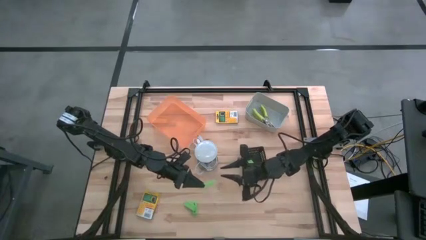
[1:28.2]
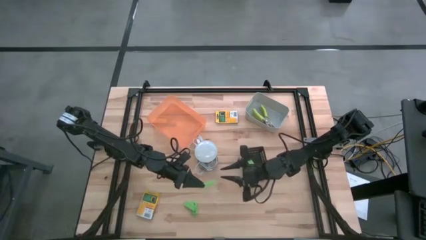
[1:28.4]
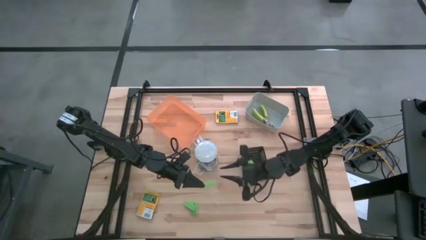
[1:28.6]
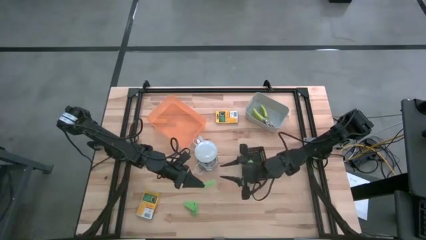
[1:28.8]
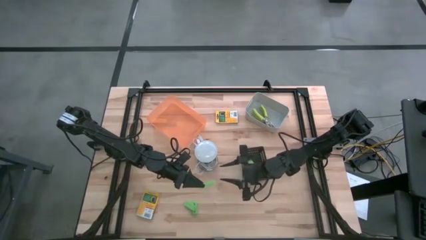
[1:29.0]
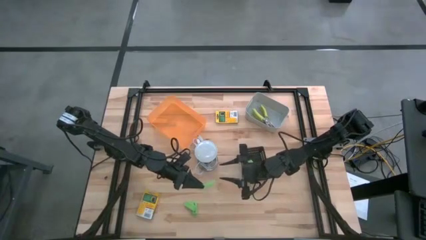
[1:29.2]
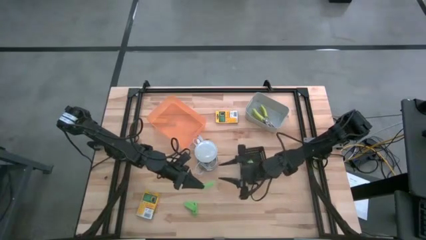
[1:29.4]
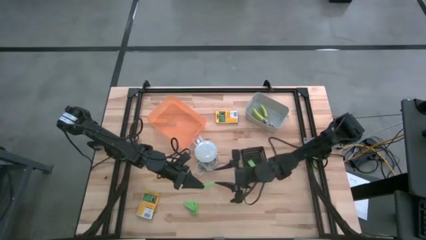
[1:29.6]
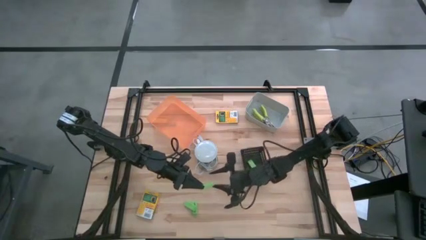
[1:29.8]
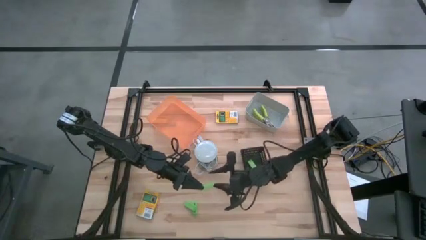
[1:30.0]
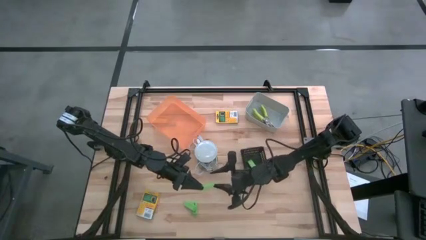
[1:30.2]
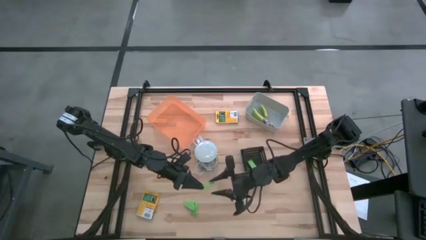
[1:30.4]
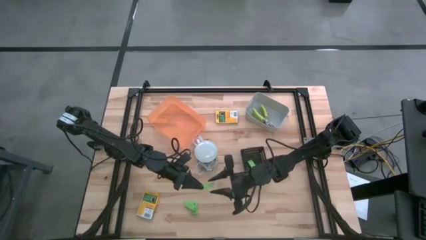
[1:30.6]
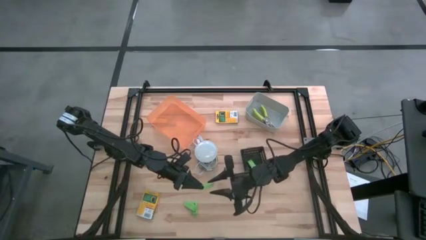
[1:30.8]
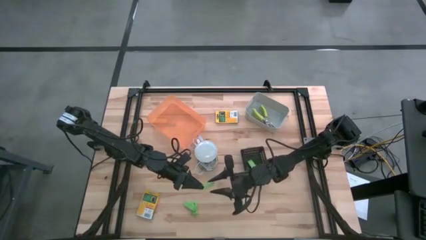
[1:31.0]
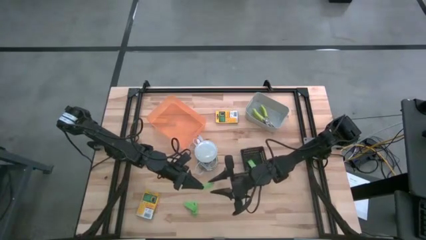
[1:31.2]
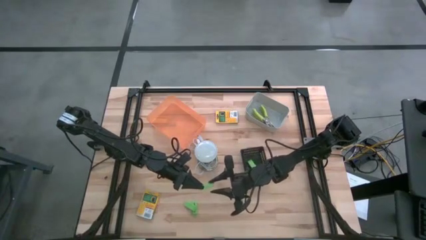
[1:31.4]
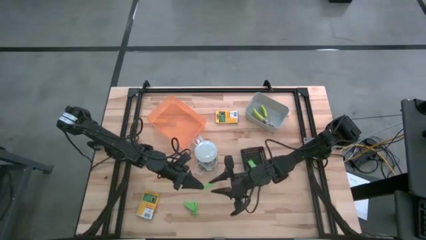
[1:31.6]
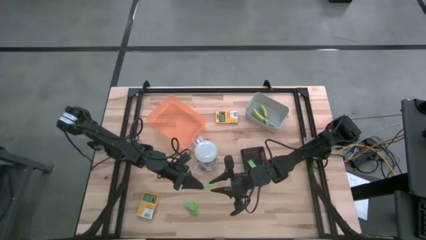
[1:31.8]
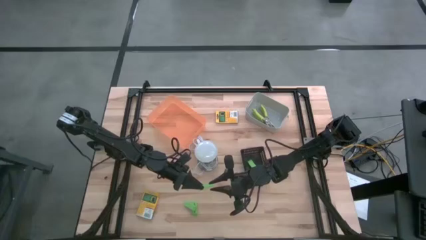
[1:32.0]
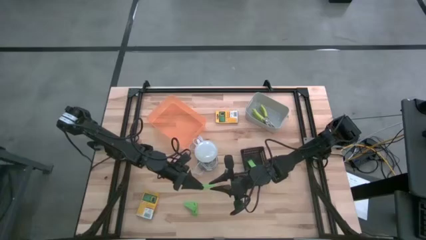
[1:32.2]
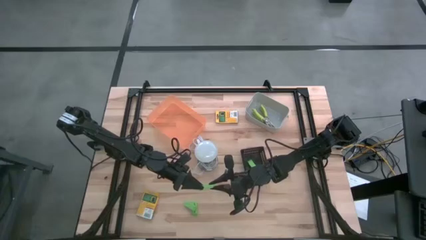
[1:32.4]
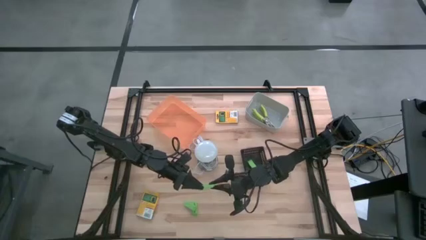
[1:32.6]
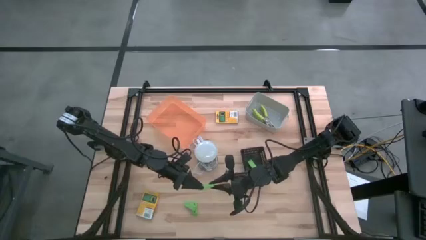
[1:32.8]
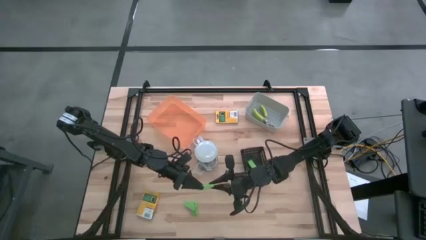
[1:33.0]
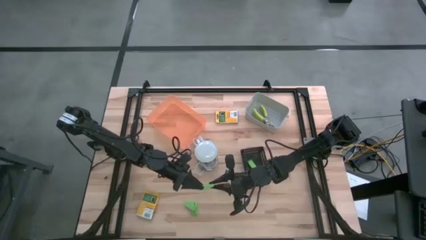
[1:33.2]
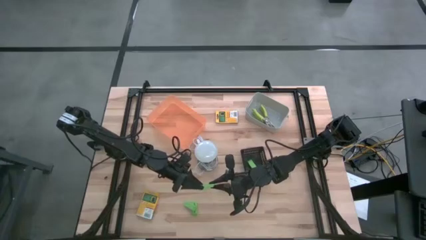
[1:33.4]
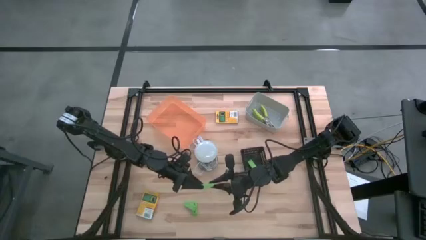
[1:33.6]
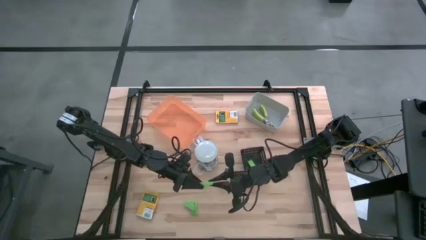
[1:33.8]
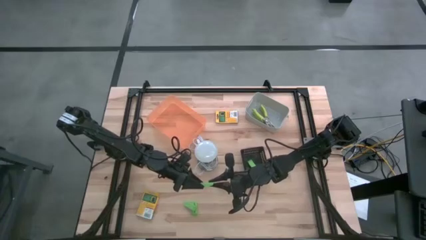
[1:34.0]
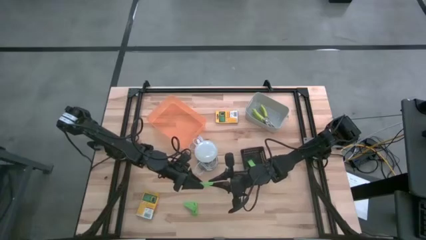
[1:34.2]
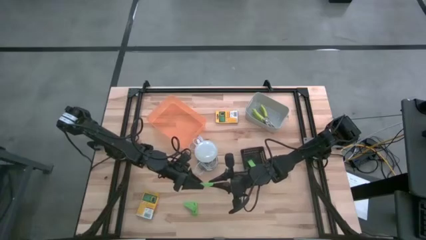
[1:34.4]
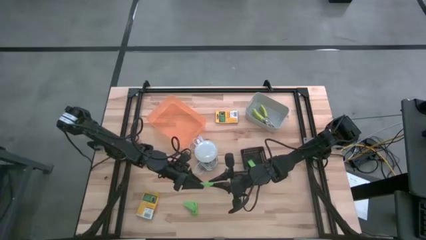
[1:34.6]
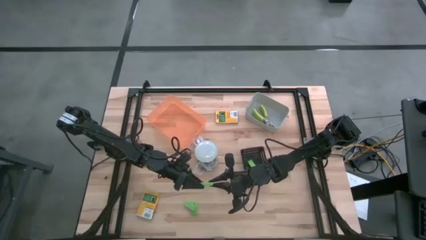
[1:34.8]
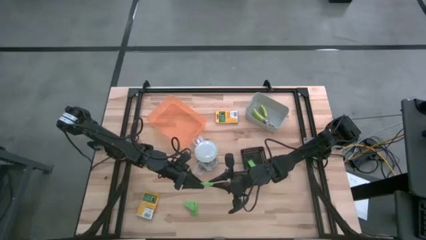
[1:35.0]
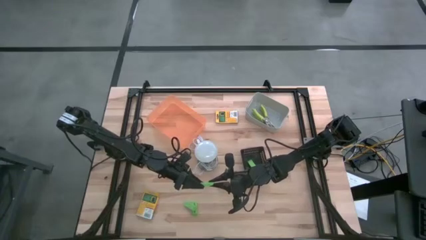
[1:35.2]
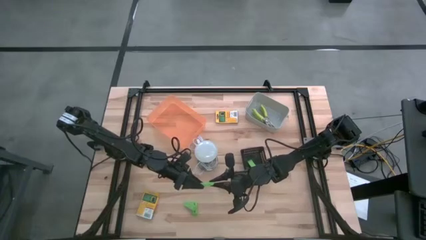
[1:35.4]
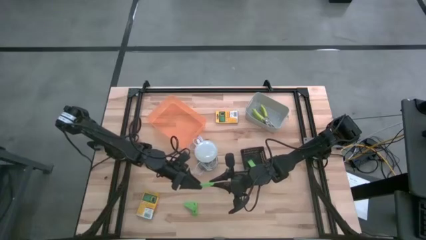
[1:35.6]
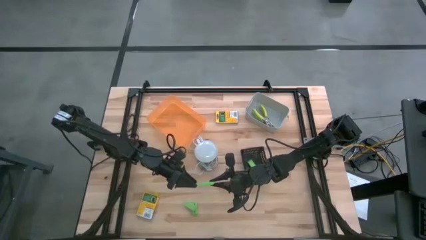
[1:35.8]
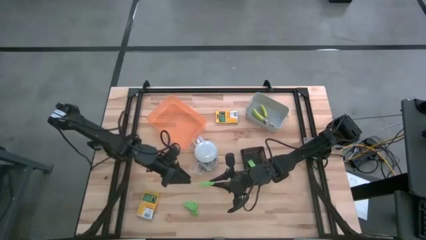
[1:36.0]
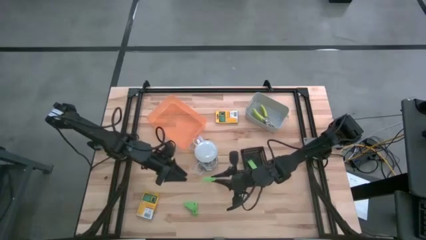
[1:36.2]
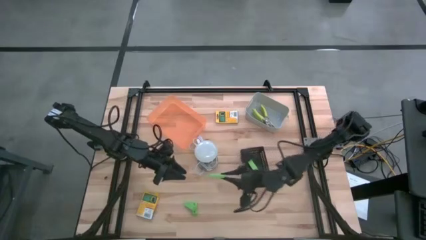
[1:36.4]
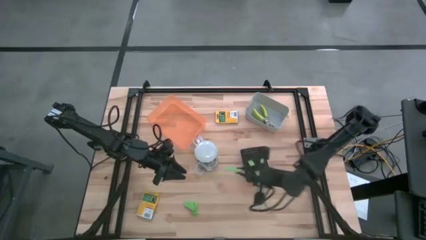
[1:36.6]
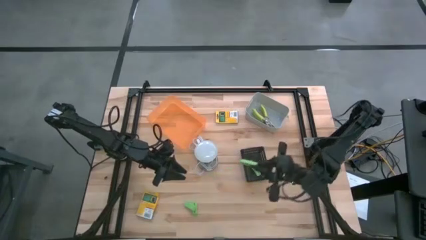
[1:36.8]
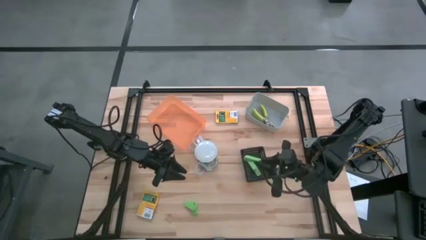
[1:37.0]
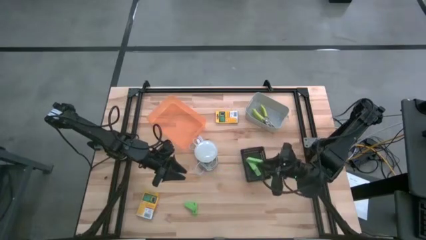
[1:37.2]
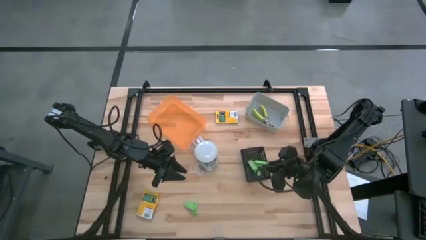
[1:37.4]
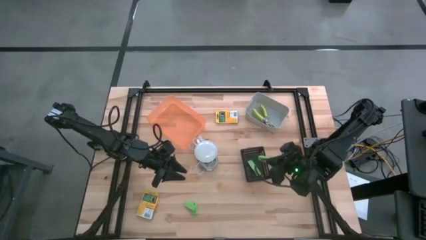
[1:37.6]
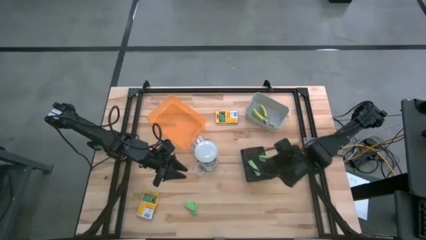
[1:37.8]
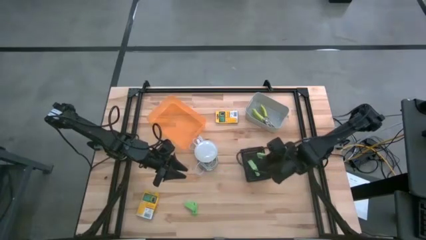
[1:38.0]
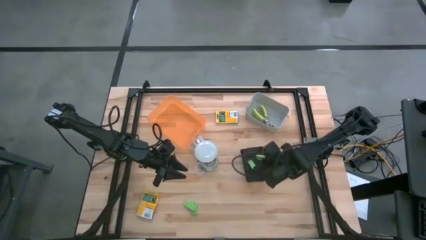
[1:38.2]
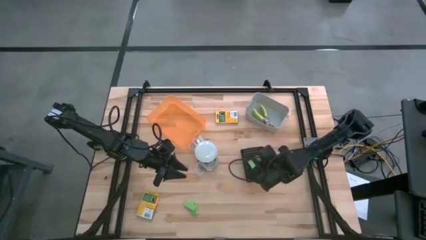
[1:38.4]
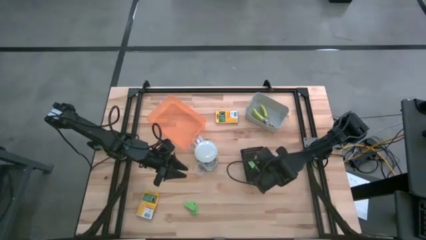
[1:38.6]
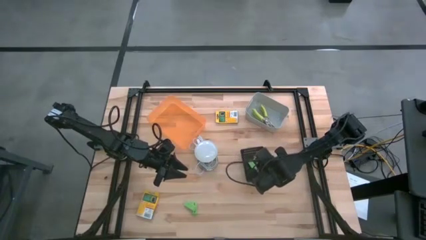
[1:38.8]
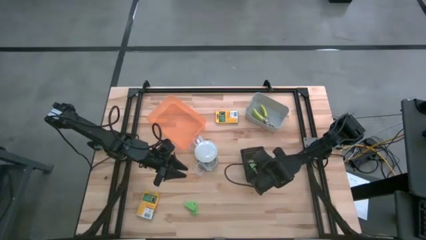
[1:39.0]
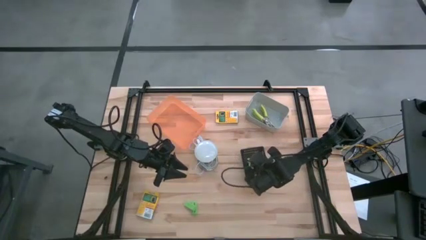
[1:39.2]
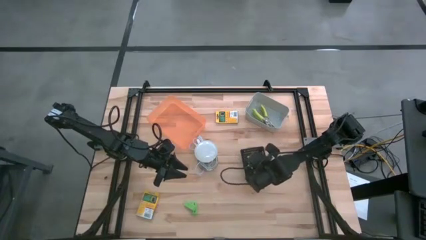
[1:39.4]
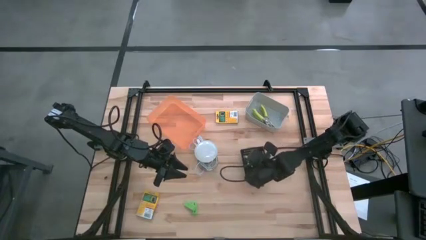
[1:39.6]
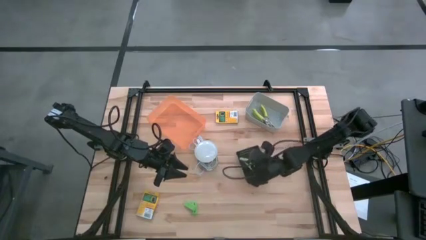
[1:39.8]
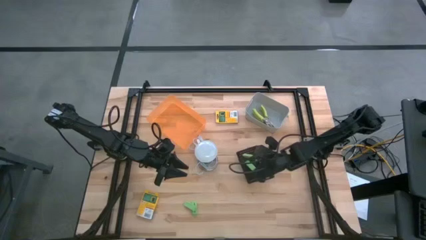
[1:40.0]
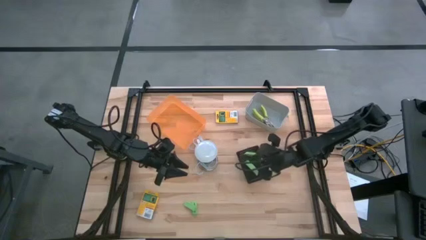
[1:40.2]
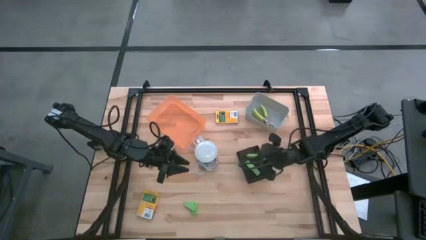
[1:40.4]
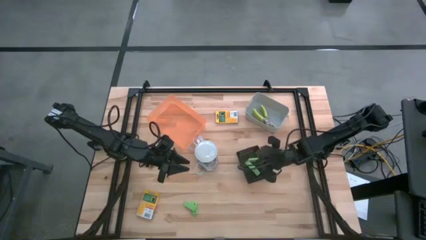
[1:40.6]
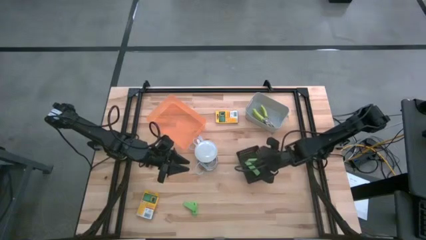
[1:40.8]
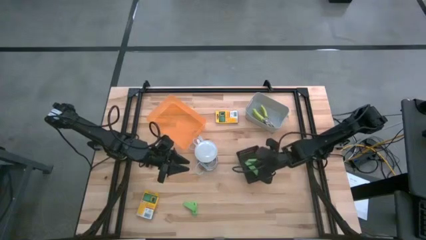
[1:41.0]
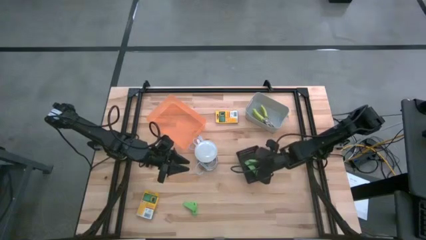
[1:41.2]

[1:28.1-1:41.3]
Task: Pick & Place School Supplies
Put the green eraser into the black bin

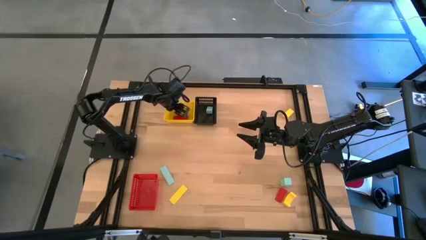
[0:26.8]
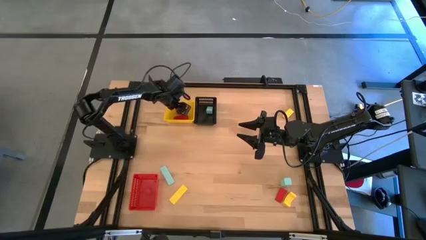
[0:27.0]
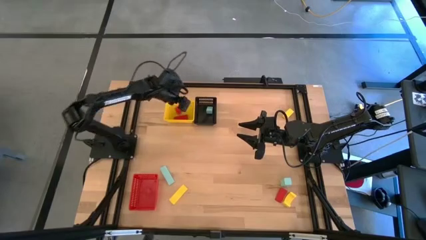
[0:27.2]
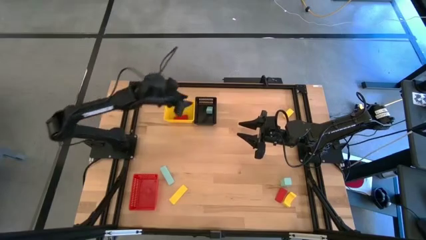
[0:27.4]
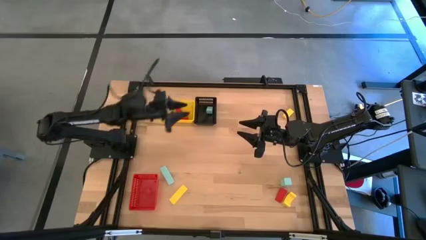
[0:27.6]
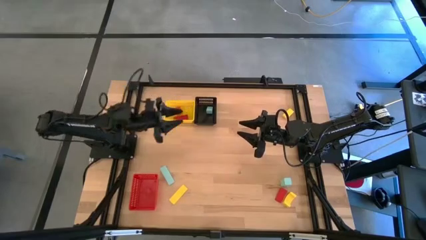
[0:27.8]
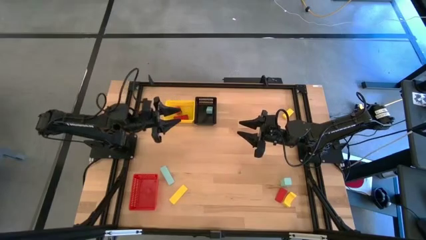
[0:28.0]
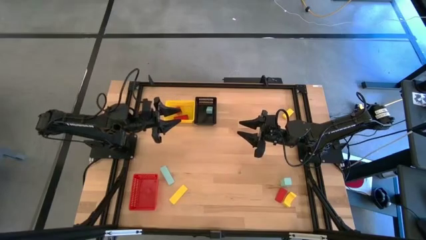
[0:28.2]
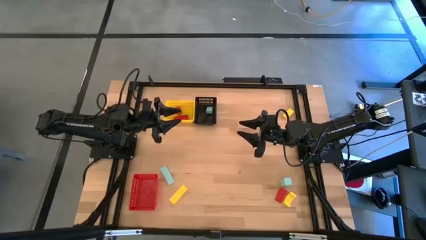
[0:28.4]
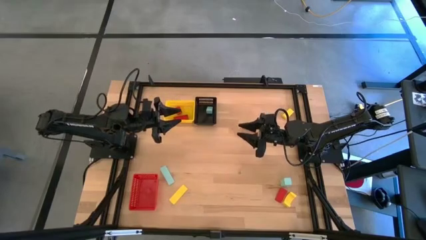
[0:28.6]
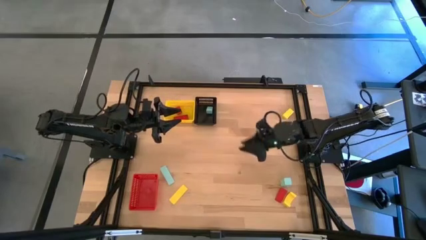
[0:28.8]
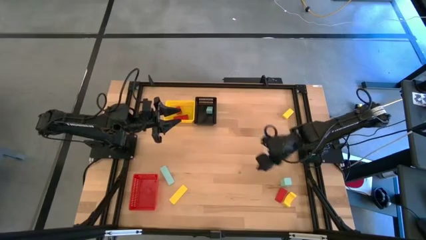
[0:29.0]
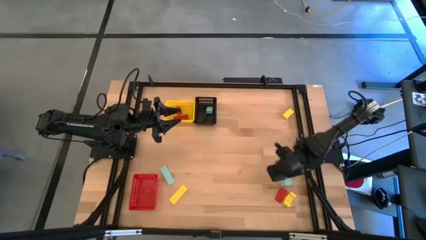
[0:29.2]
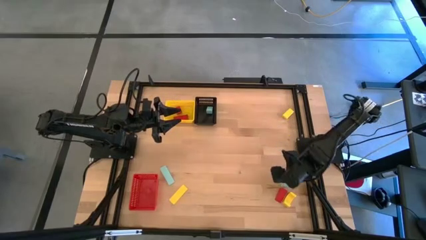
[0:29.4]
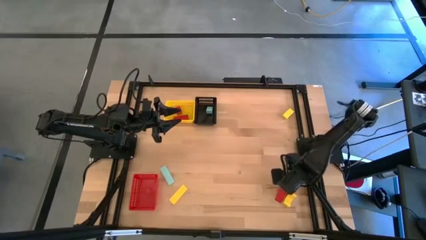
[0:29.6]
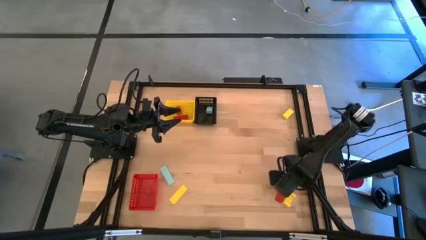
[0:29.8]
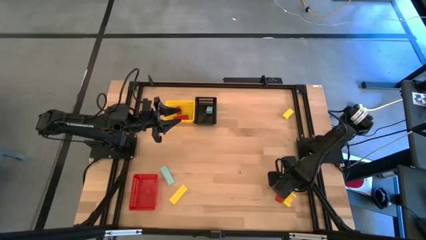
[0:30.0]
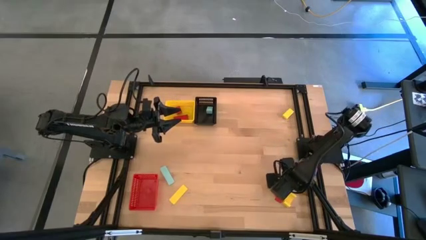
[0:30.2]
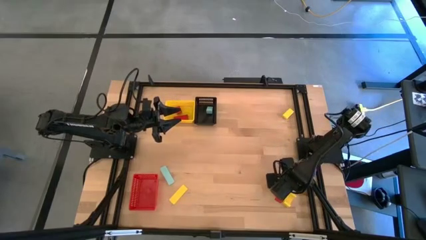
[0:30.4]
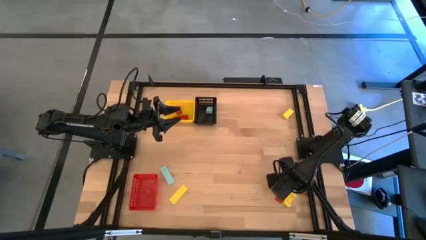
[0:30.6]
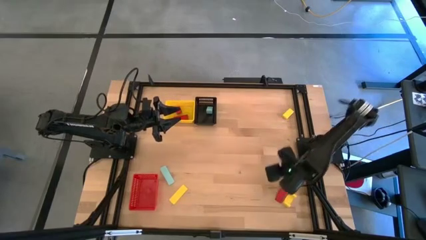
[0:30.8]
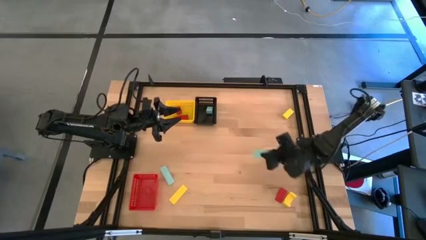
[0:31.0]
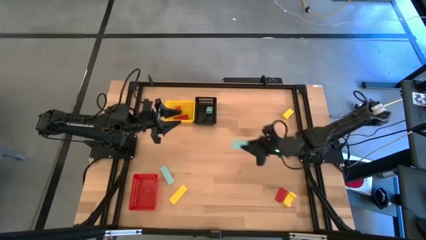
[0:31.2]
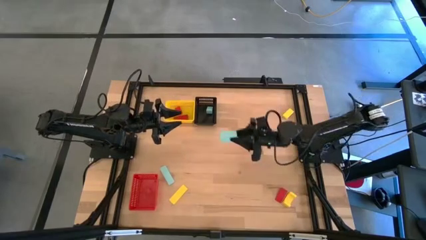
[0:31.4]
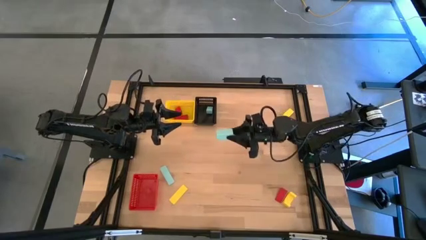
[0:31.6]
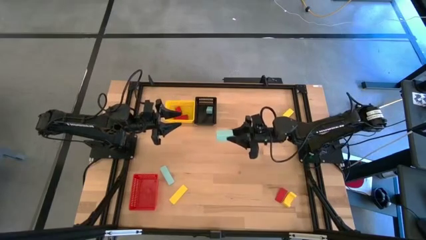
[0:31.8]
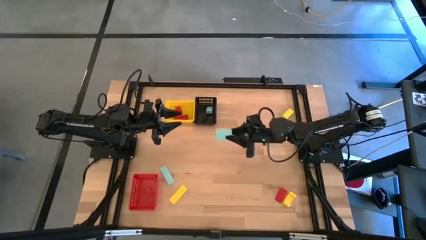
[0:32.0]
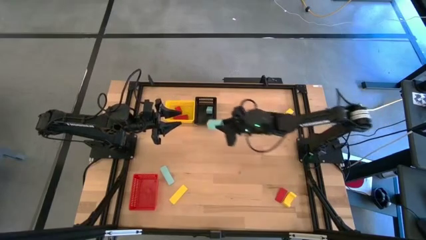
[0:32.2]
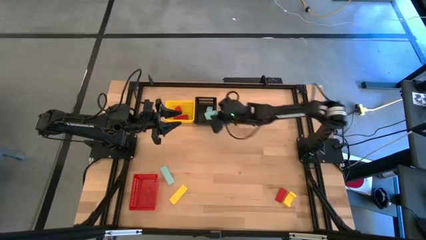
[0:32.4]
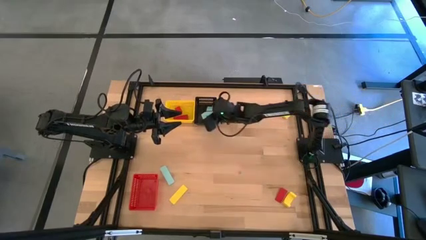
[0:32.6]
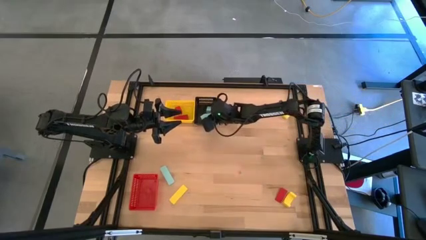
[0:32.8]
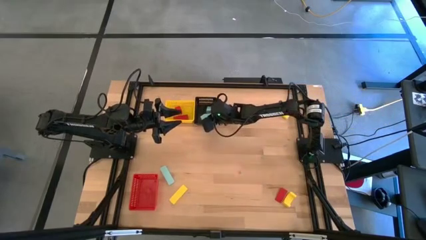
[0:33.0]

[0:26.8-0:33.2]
Task: Sort & place blocks by color
Put the right blue block into the black basket
